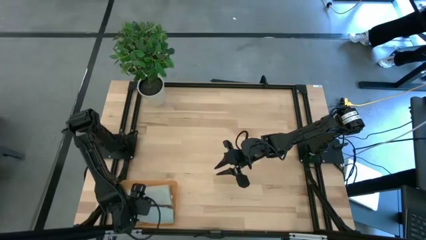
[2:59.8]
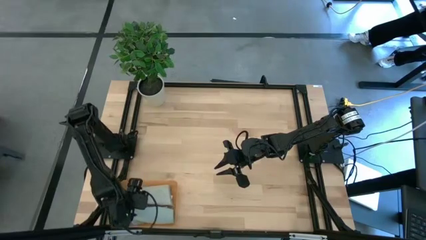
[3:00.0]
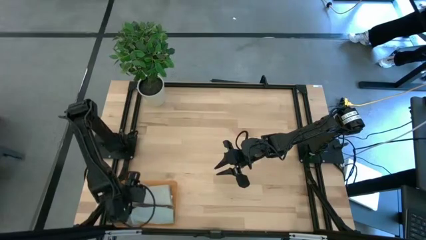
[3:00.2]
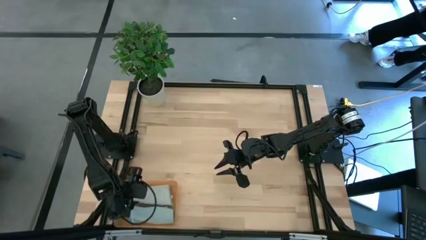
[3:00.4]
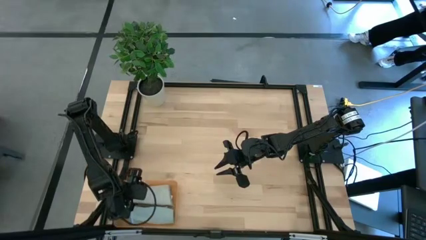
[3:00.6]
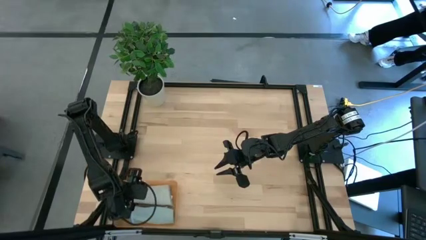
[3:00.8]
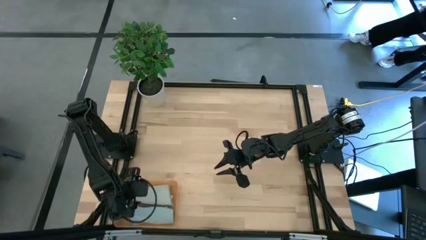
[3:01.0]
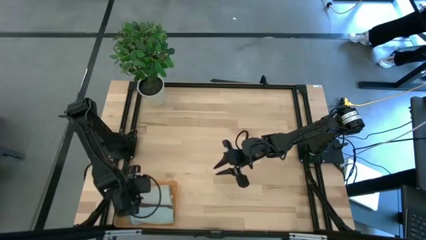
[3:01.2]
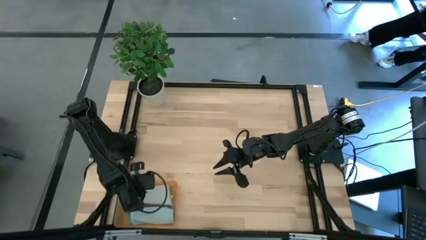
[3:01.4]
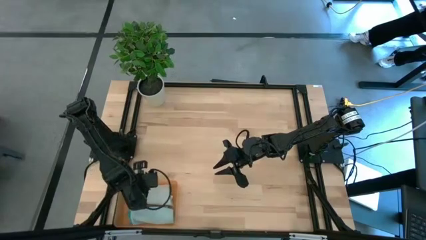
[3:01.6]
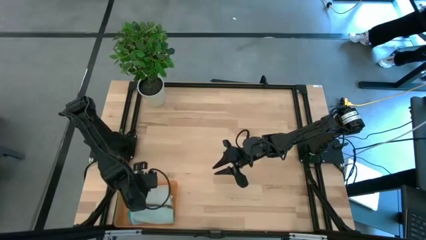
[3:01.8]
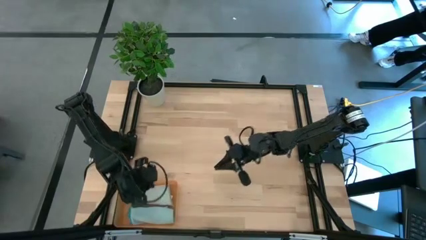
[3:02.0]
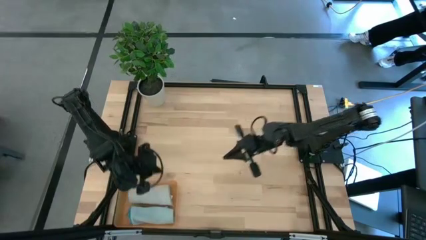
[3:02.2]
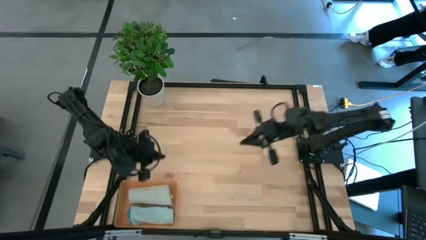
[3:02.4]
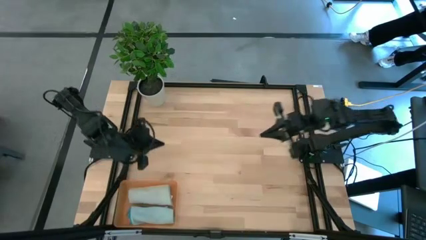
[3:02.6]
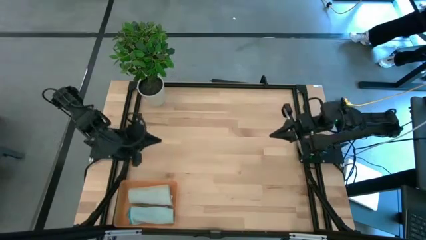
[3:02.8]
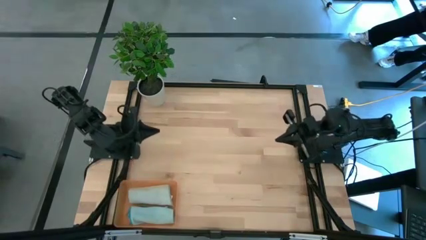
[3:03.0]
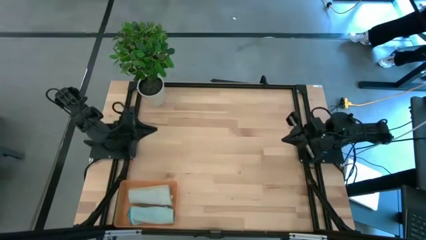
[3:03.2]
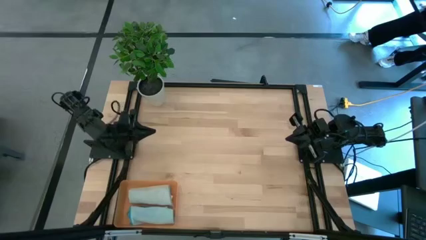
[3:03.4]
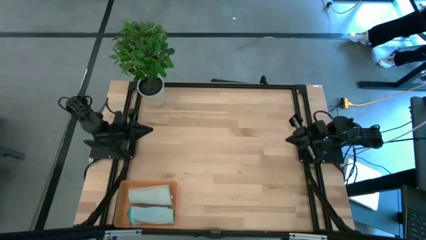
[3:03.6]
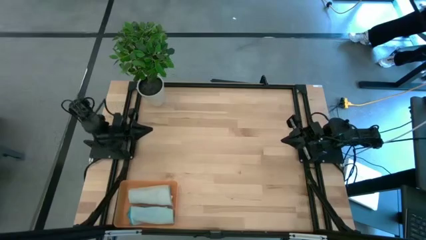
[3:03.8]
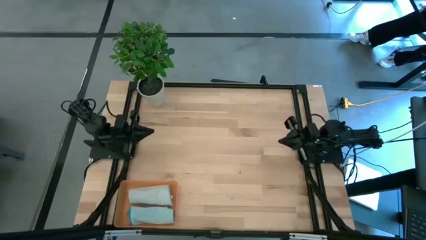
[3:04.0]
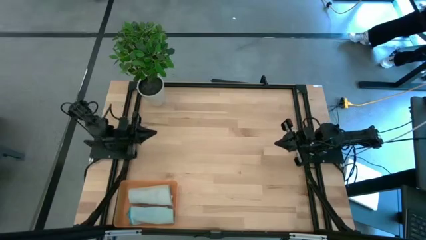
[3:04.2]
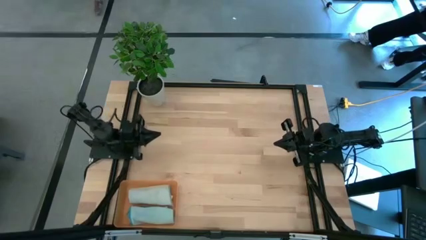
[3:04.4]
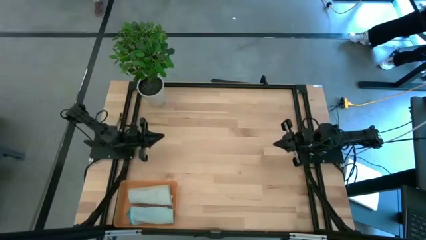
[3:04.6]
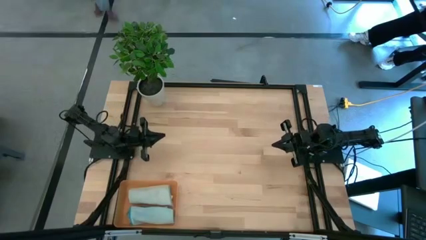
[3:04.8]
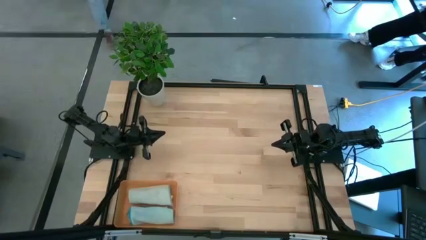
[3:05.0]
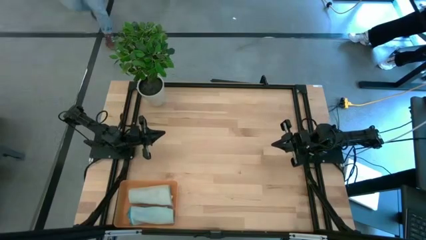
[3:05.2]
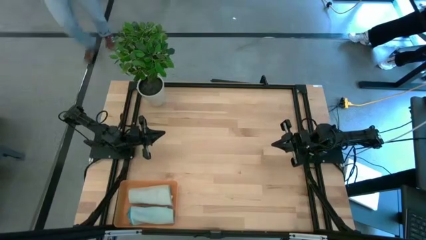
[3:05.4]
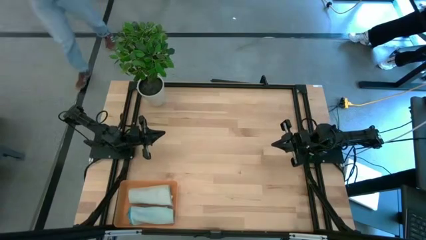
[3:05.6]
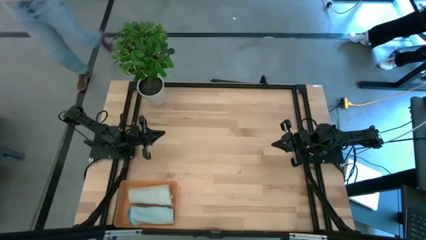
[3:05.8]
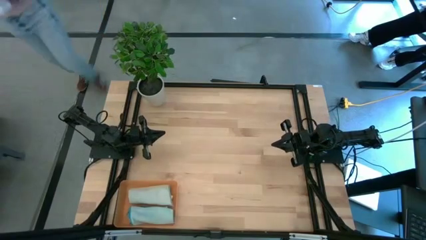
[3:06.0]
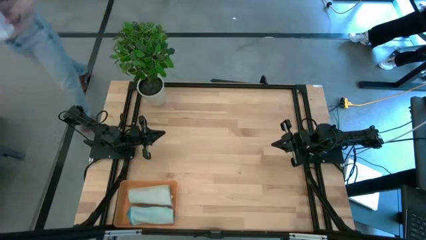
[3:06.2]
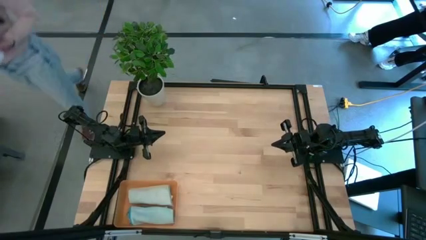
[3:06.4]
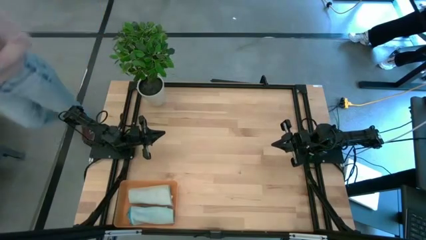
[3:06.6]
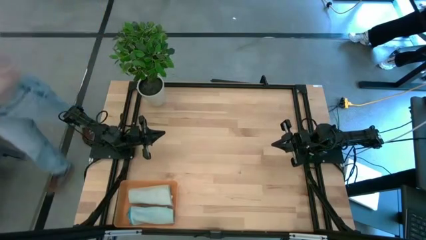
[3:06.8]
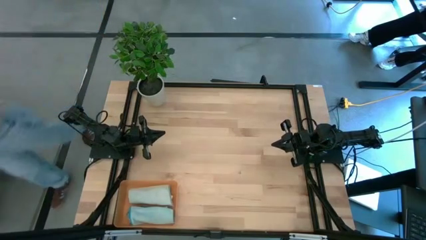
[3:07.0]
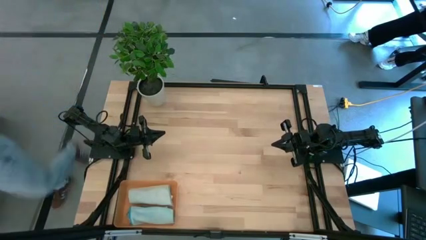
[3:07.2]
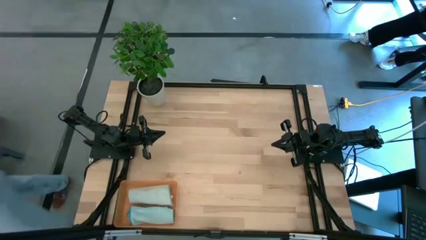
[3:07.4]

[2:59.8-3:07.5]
Task: Roll microfiber towels into tight, uniform cylinder then place into a basket
Return to Home Position

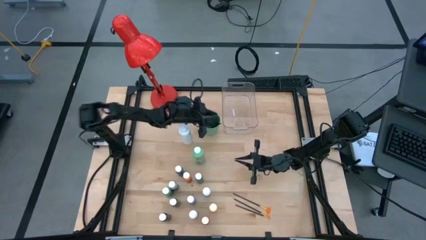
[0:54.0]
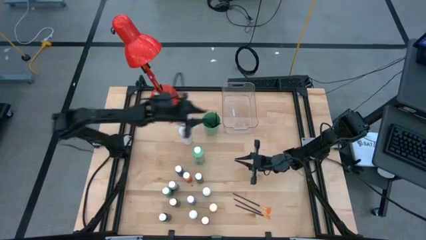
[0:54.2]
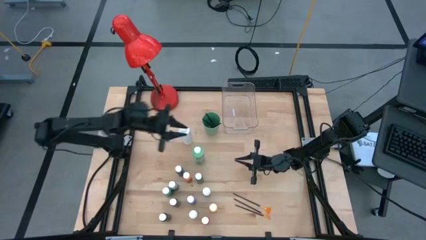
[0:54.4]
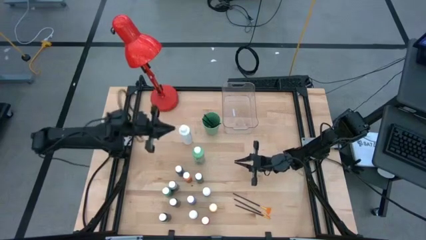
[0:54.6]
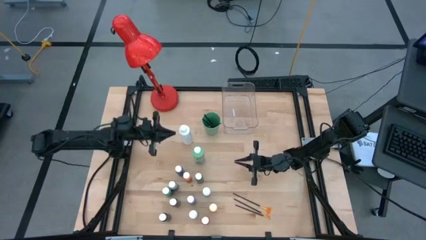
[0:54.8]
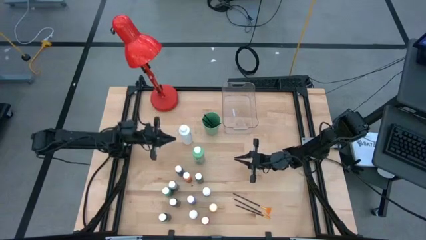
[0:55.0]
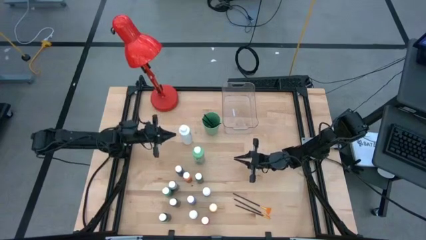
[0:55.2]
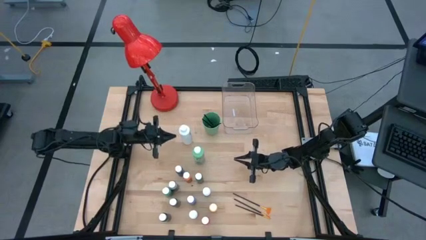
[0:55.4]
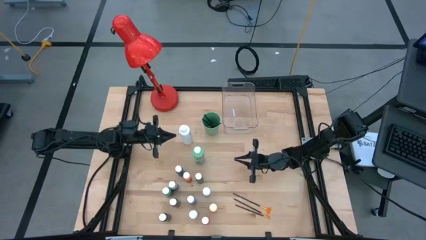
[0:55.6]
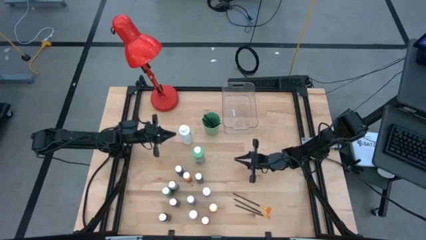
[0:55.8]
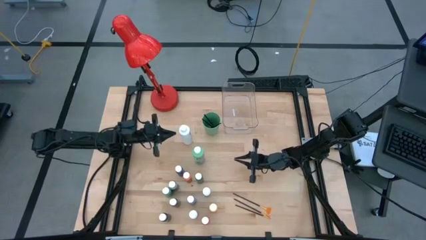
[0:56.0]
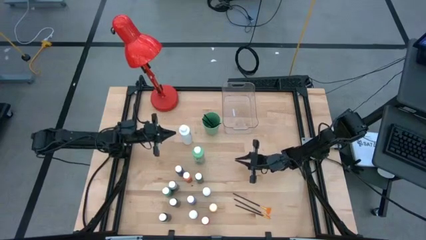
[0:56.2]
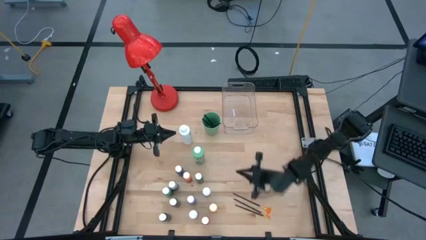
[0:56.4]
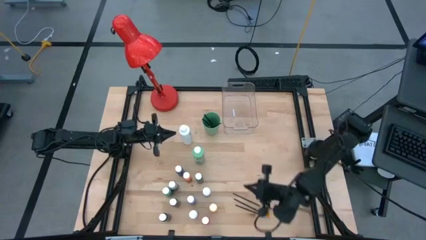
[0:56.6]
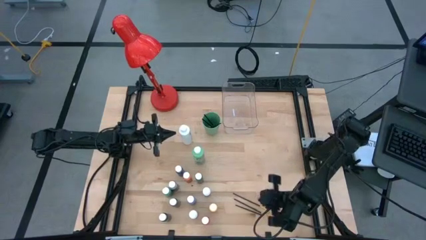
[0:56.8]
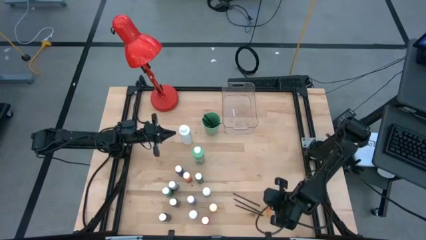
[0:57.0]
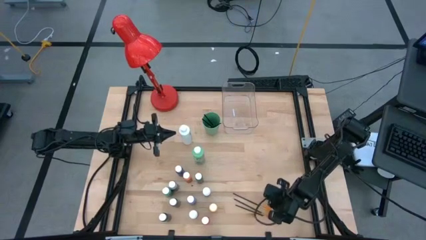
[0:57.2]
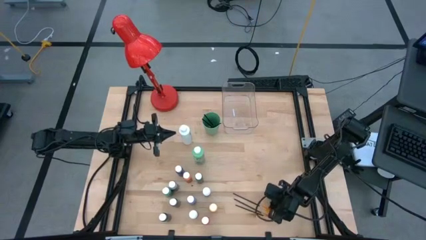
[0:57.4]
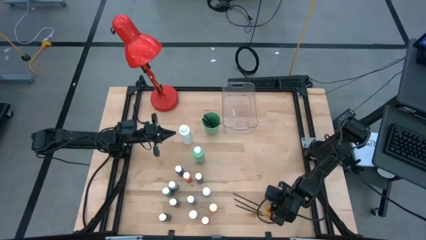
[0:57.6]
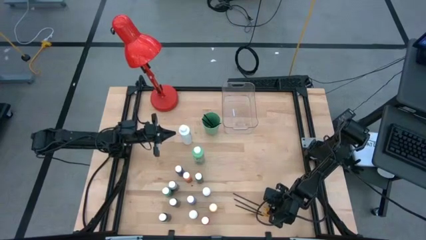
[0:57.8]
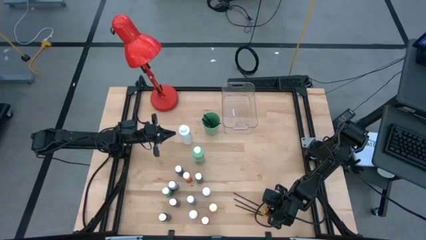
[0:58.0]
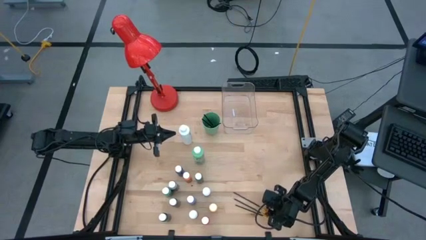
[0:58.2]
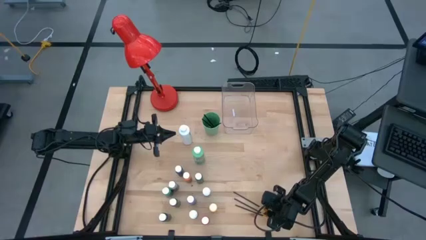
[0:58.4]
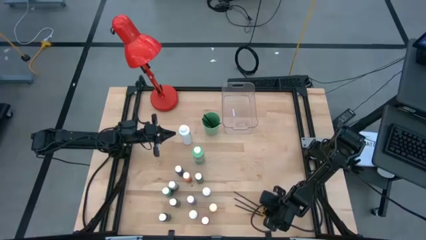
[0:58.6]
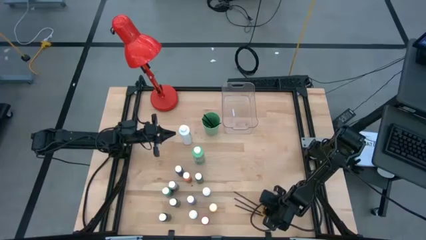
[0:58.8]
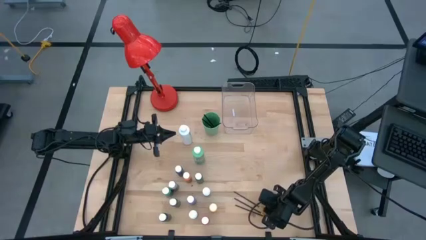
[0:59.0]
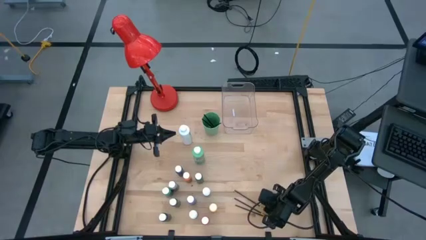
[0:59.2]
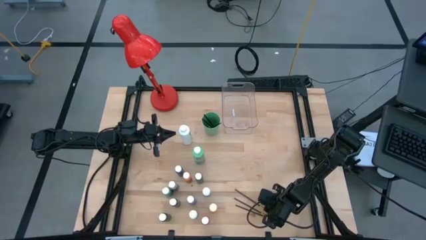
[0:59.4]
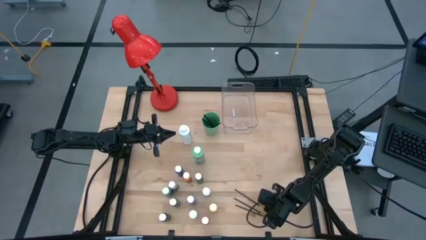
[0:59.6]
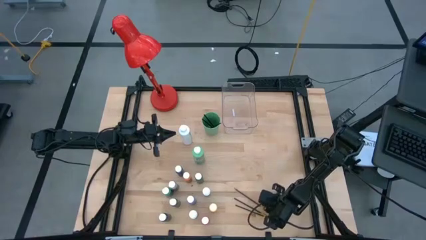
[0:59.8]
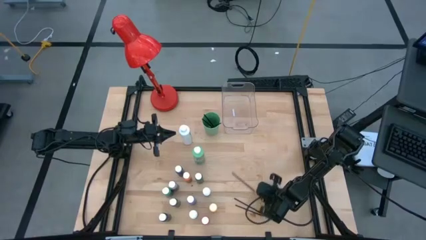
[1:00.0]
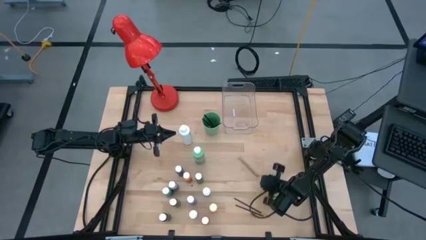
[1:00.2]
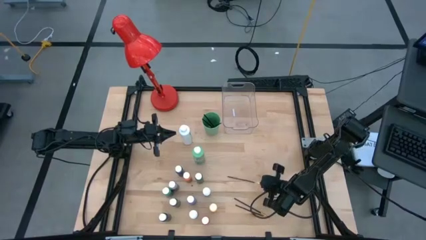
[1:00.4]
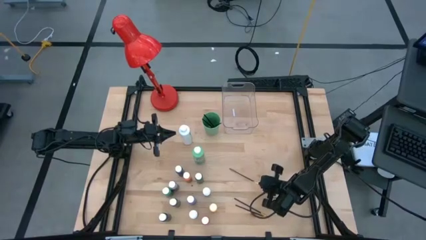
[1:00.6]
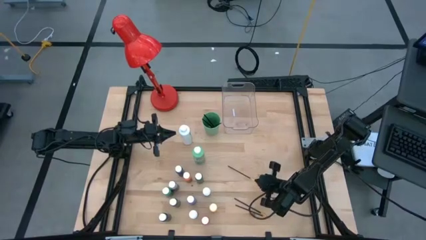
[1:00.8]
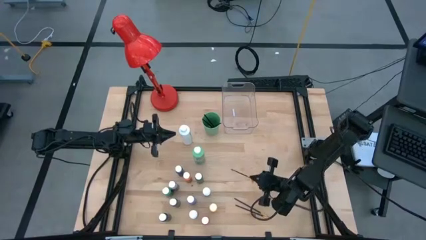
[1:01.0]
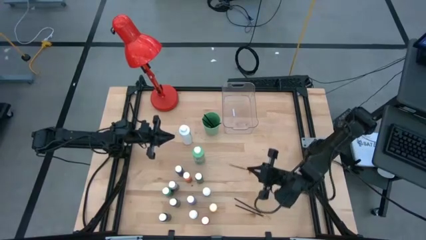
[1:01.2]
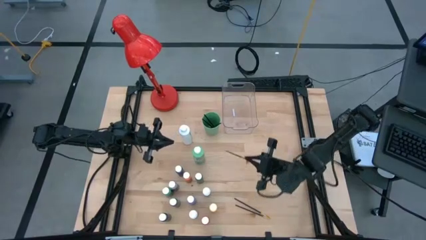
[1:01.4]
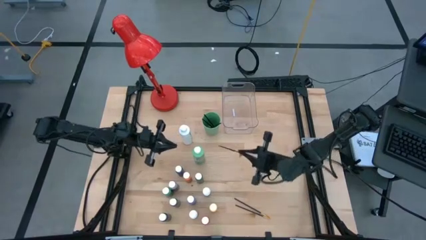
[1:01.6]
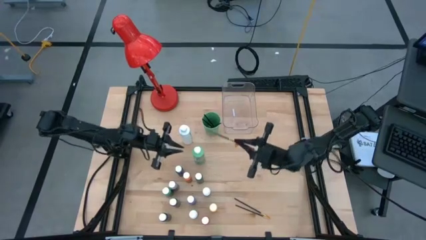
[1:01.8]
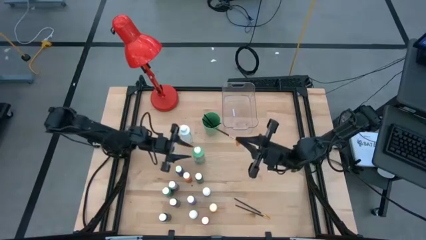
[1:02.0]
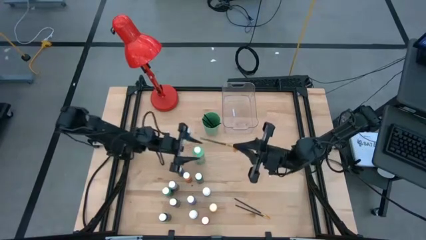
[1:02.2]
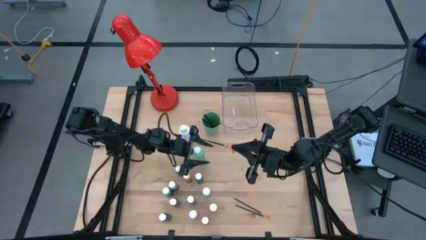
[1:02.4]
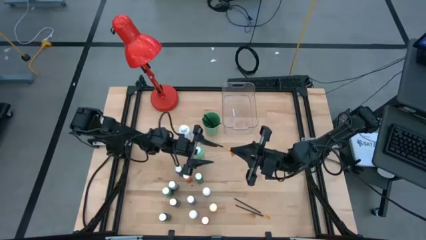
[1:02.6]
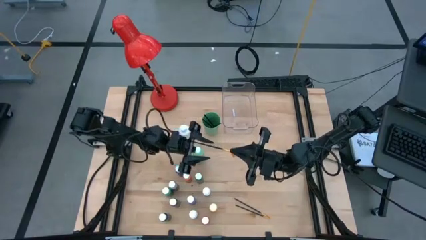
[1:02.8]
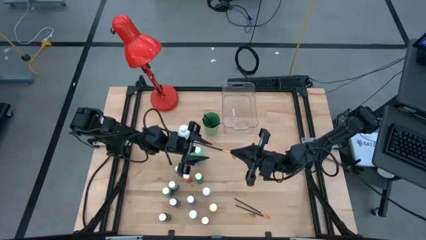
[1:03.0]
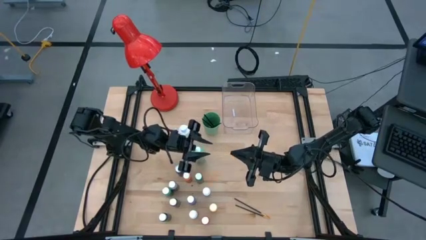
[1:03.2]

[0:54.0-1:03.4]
Task: Pick & Place Paint Supplies
Put the orange paint brush into the green cup
